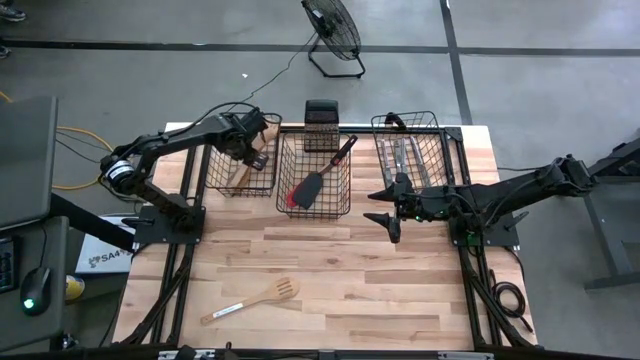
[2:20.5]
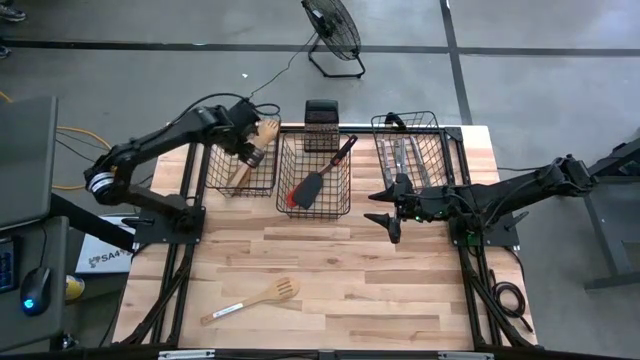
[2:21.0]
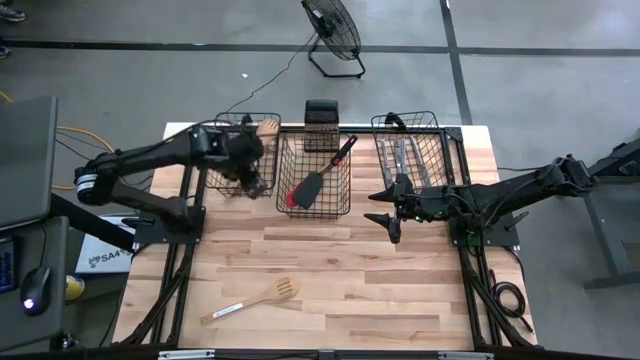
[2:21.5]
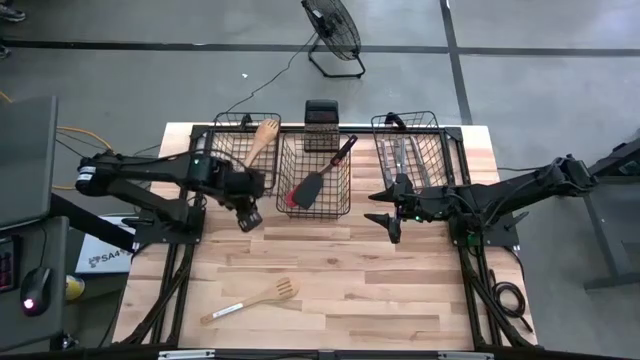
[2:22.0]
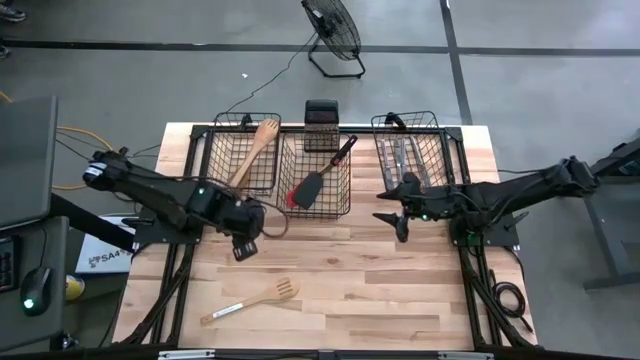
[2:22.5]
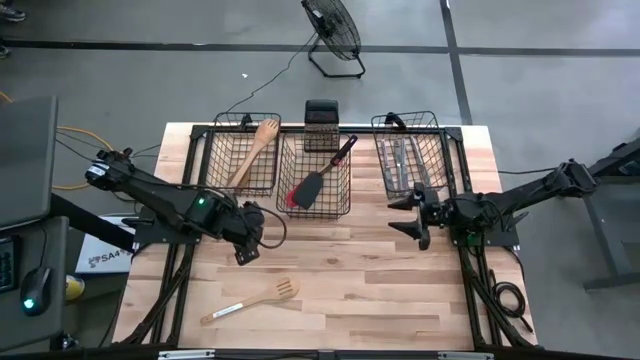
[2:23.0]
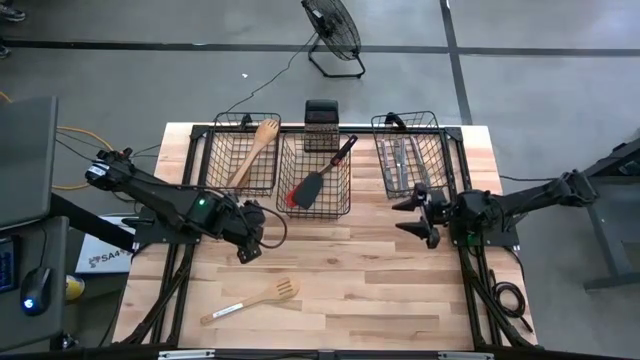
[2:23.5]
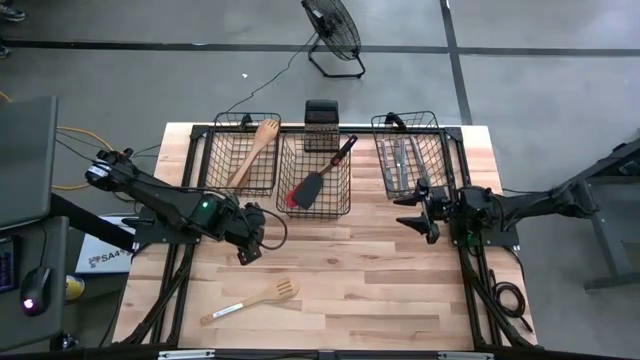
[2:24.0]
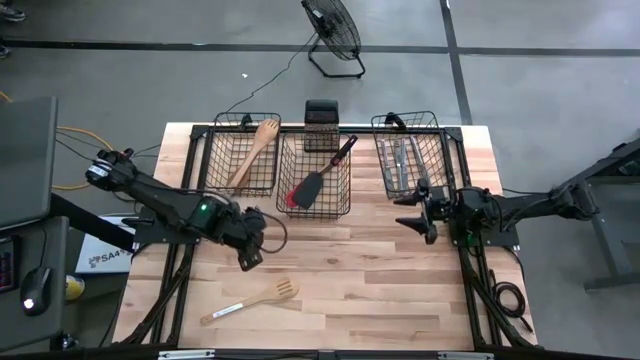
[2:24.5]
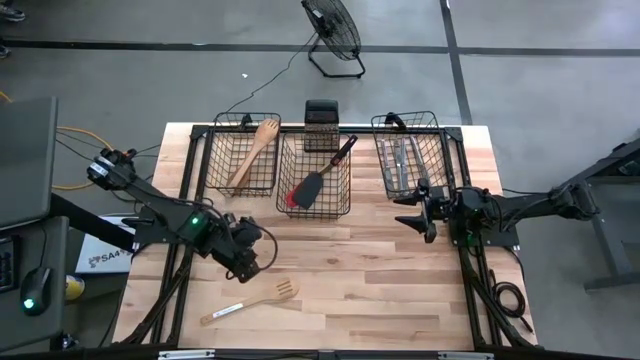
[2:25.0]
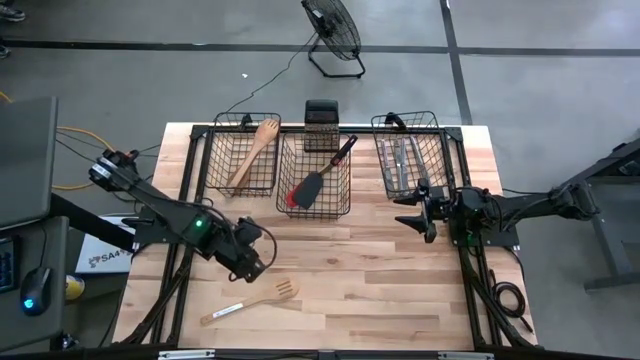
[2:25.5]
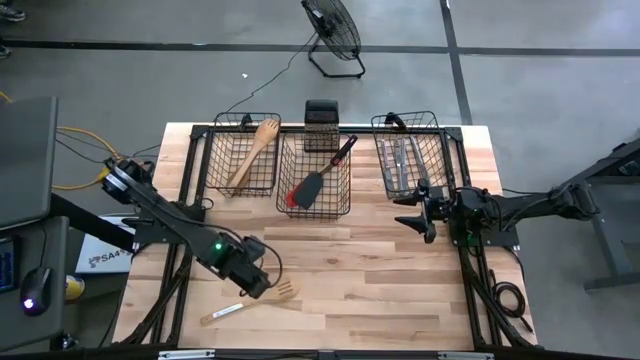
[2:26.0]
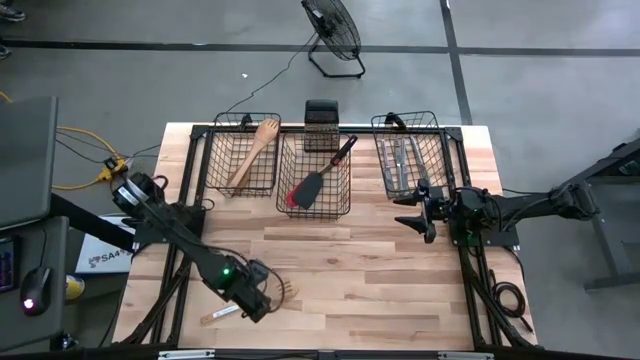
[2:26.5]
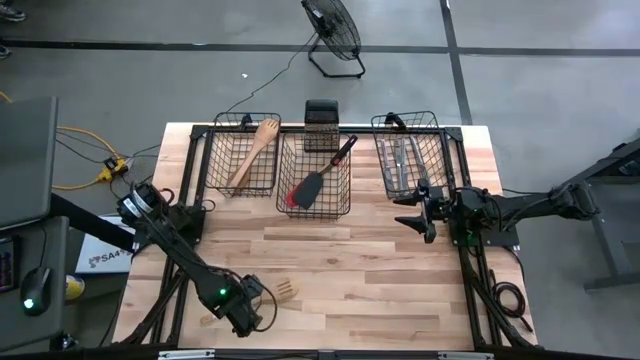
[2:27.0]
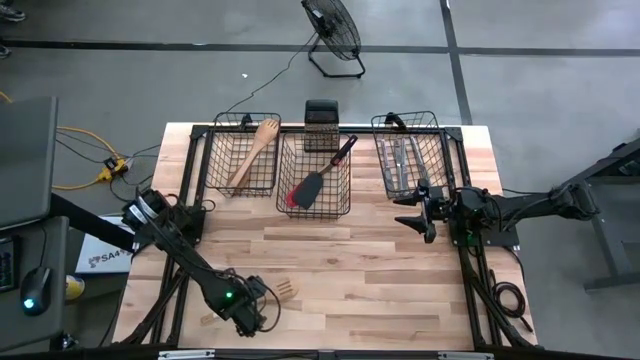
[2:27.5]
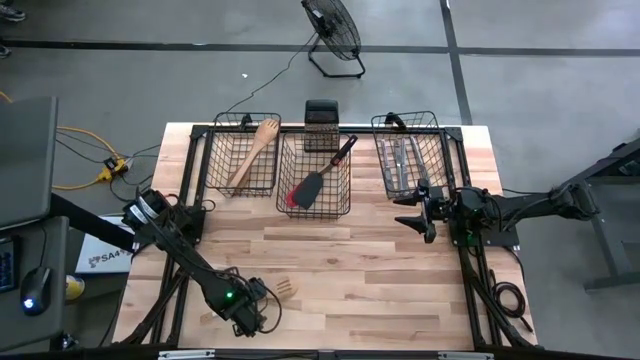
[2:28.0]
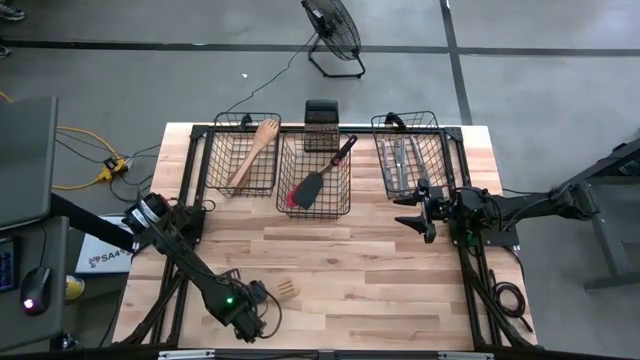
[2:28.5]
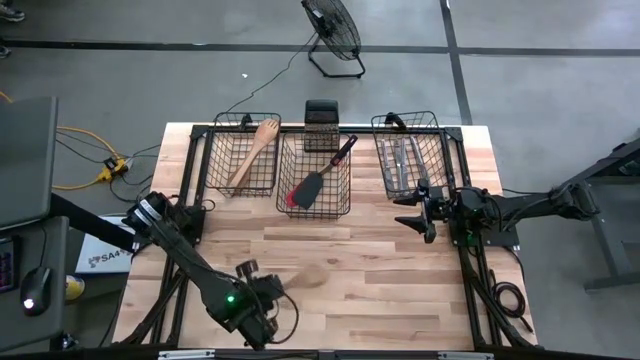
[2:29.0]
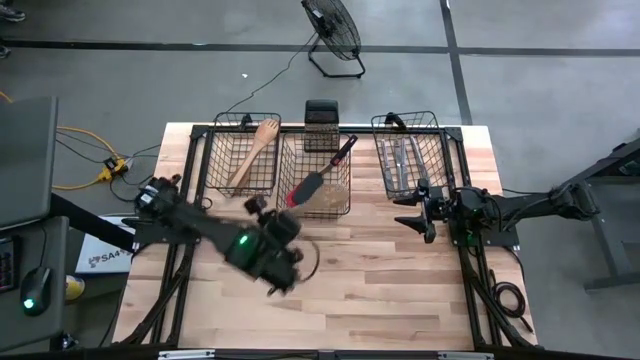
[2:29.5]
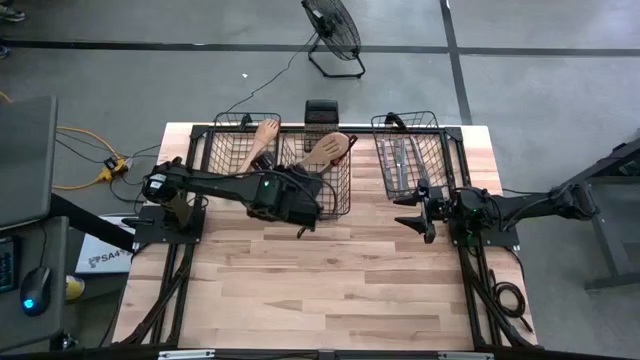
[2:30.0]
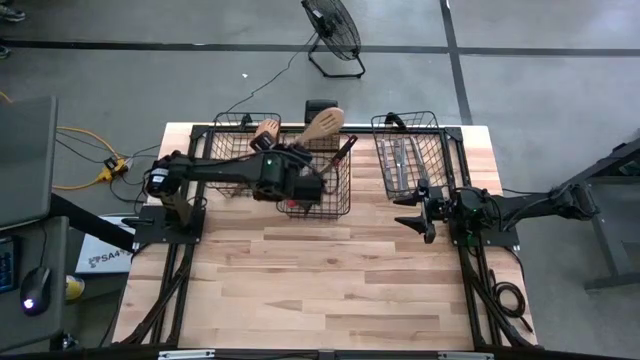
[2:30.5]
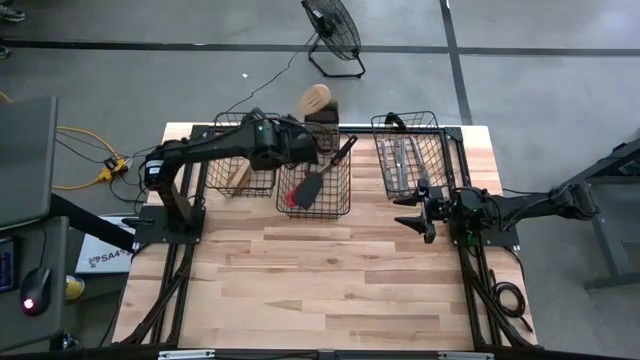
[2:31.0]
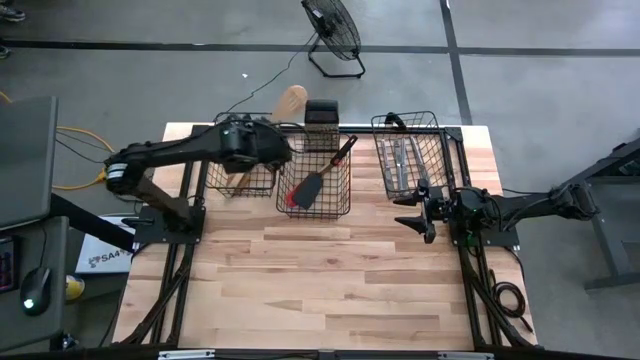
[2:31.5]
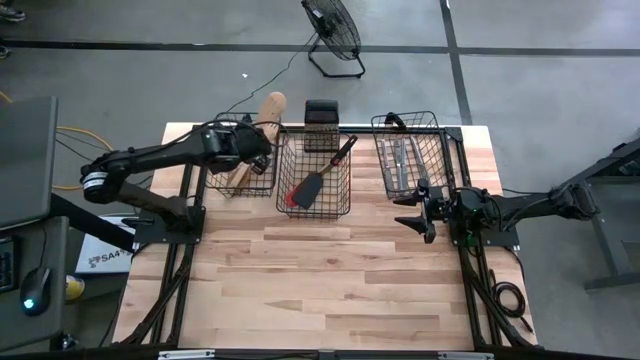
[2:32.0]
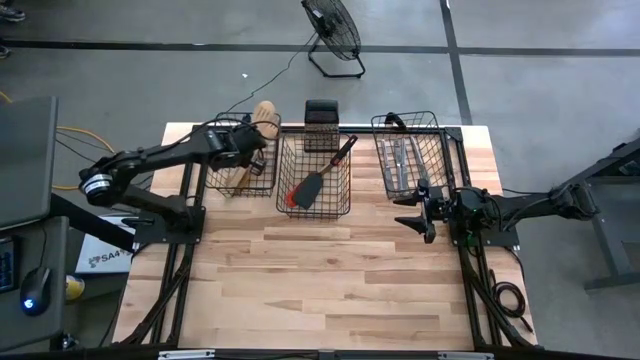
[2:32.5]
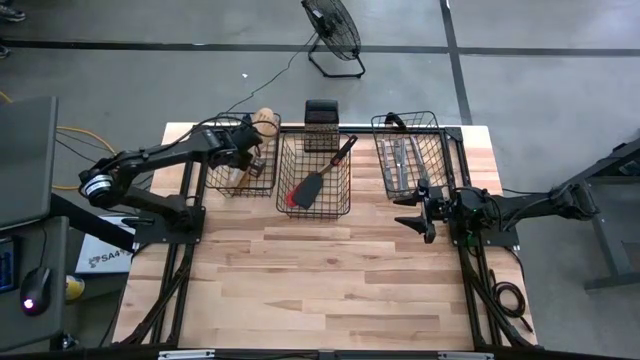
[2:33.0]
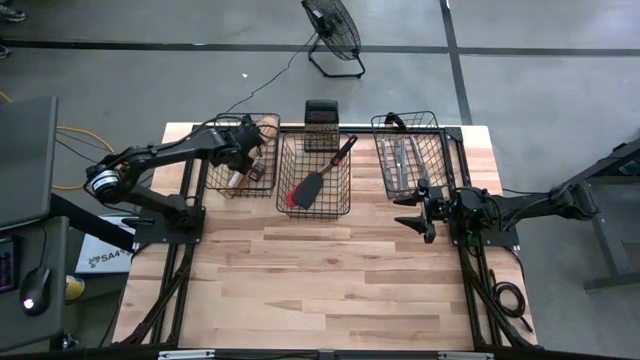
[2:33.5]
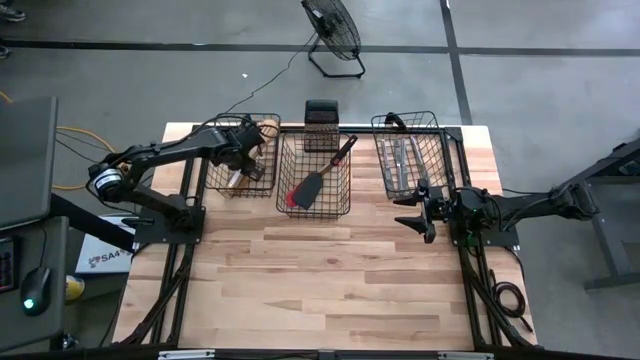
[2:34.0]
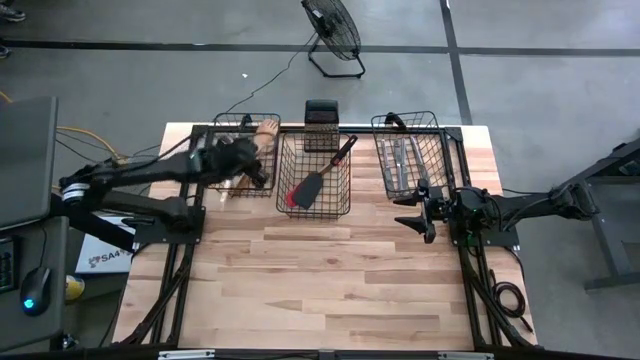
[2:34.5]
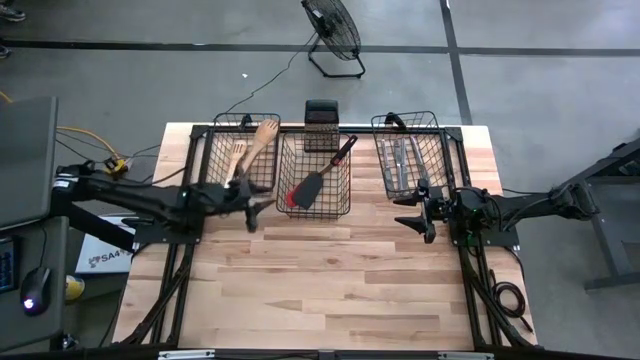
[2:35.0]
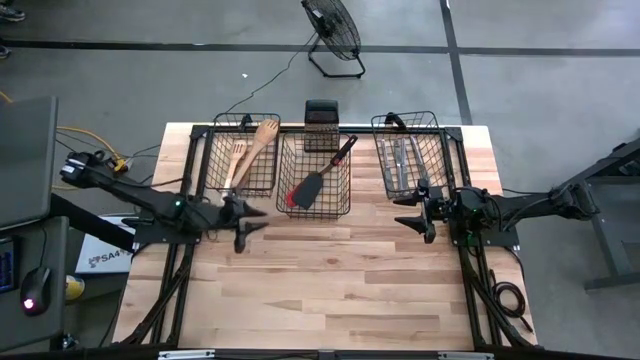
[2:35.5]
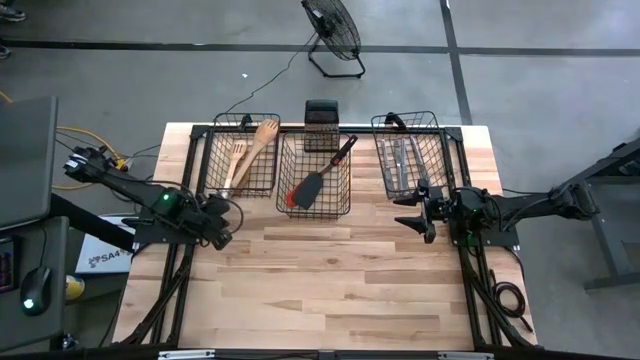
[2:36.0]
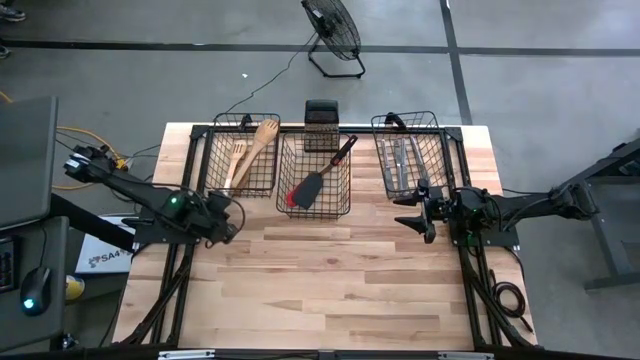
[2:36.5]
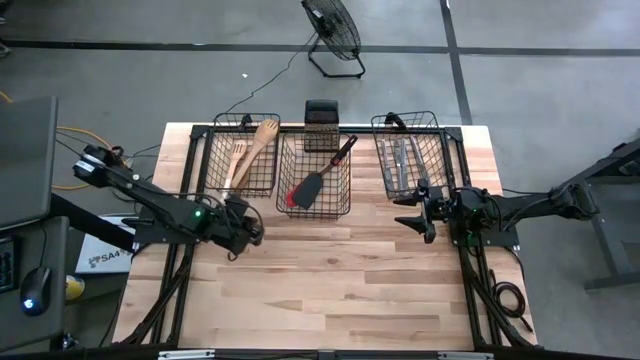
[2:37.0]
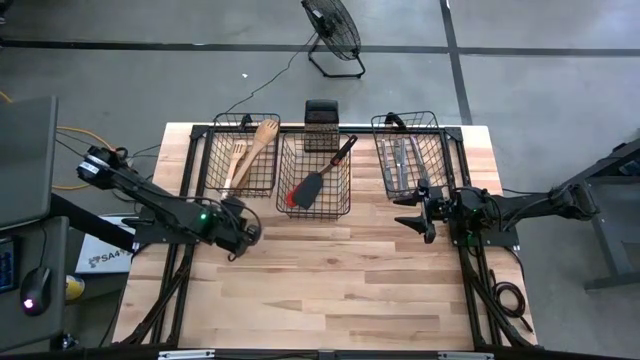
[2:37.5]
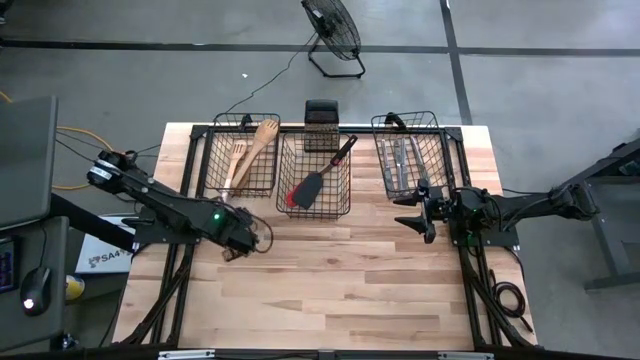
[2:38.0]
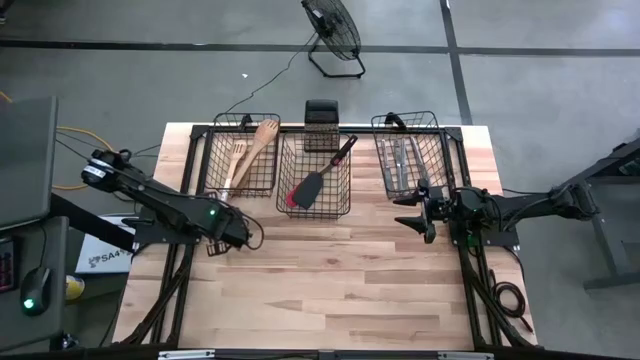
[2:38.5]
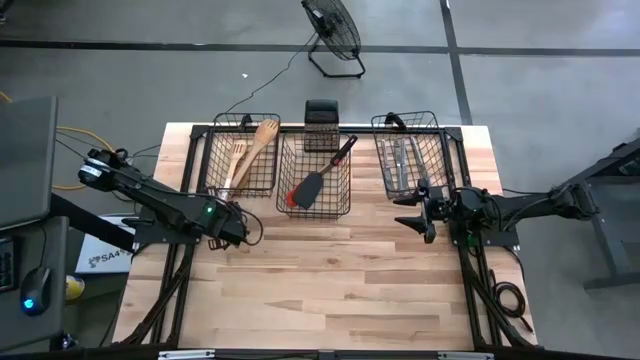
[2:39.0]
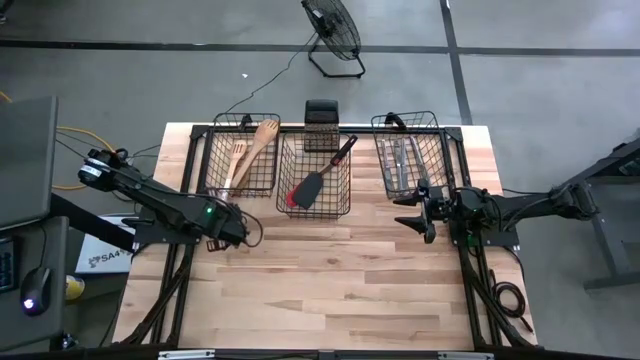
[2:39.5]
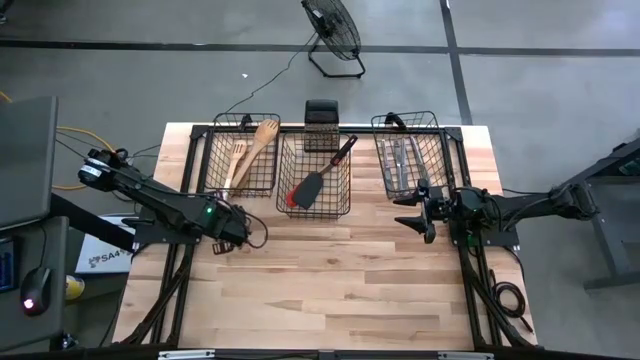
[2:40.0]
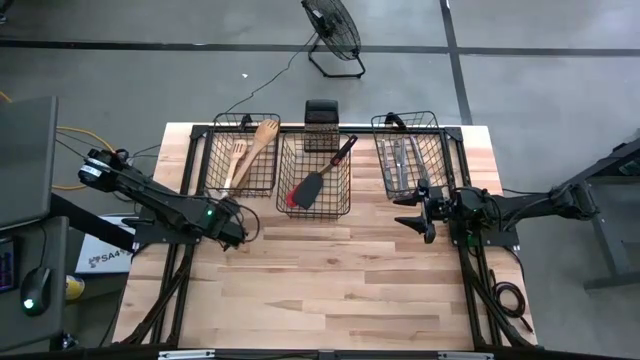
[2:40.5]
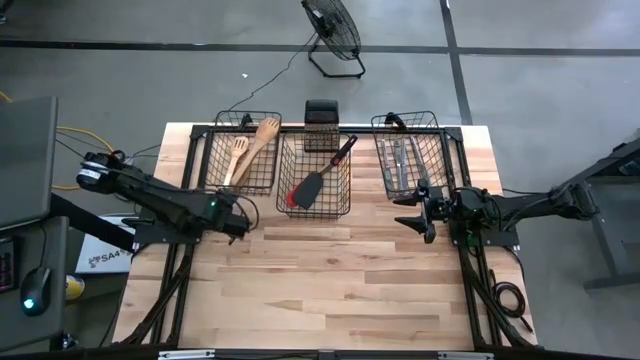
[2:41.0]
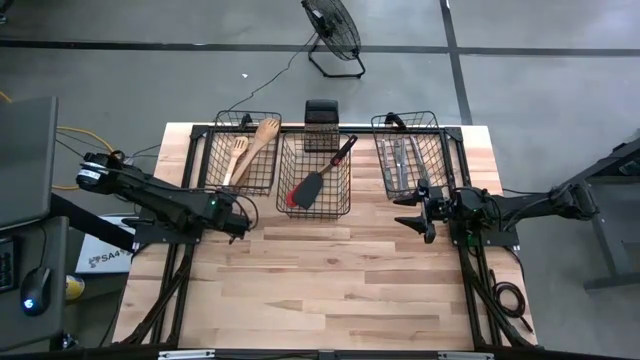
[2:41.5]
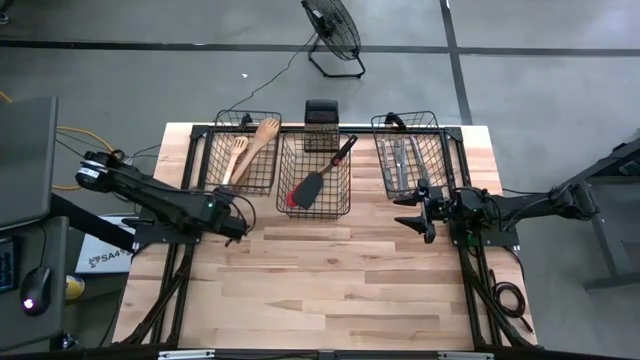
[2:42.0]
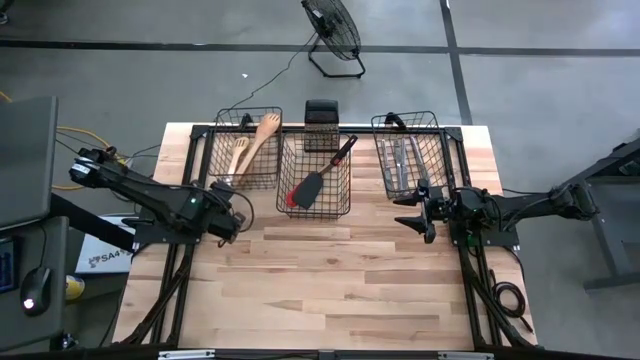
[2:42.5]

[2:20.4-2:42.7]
Task: Pick & Place Kitchen Items
Put the light brown wooden slotted serving spoon into the left wire basket
